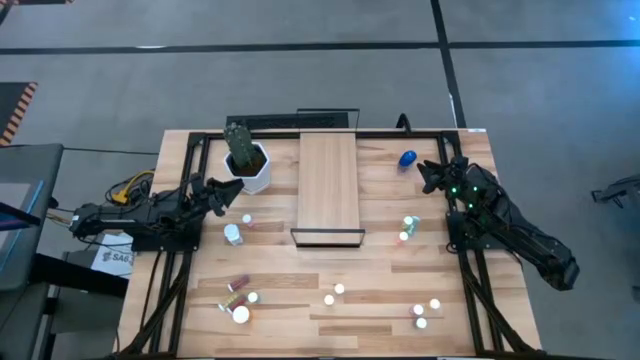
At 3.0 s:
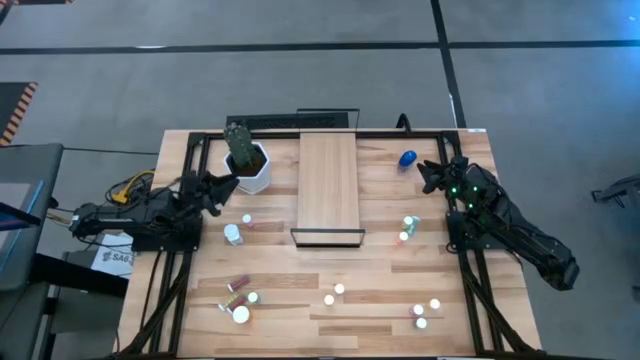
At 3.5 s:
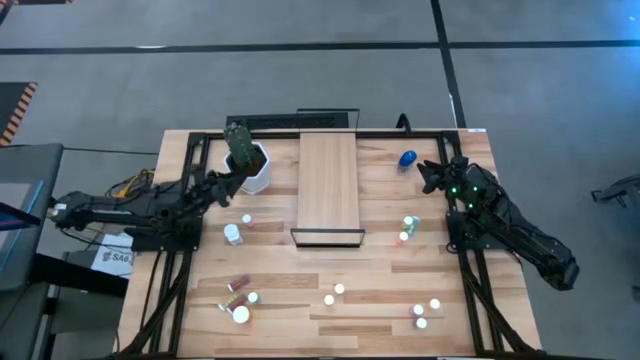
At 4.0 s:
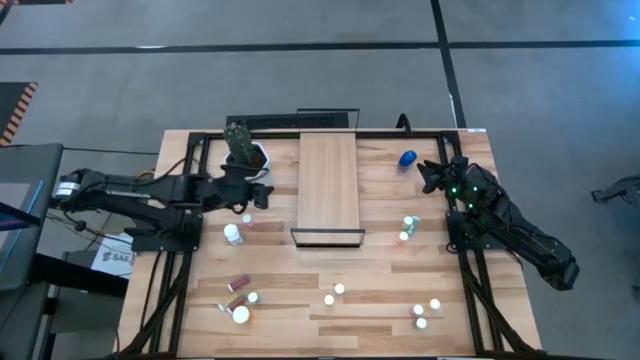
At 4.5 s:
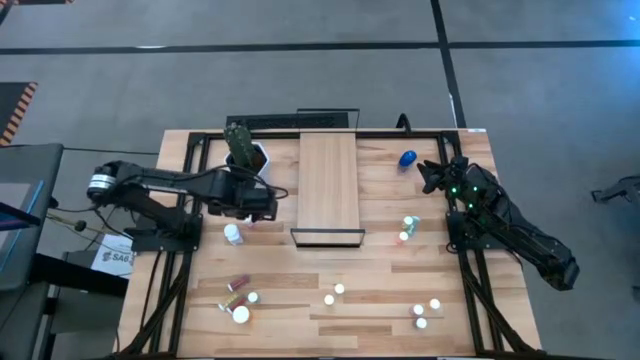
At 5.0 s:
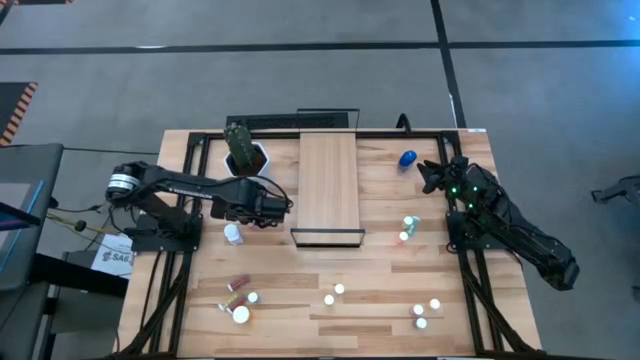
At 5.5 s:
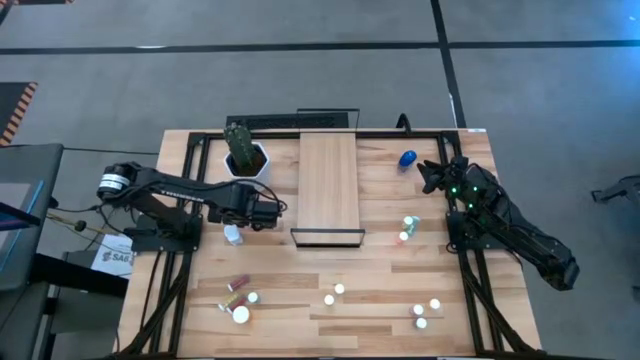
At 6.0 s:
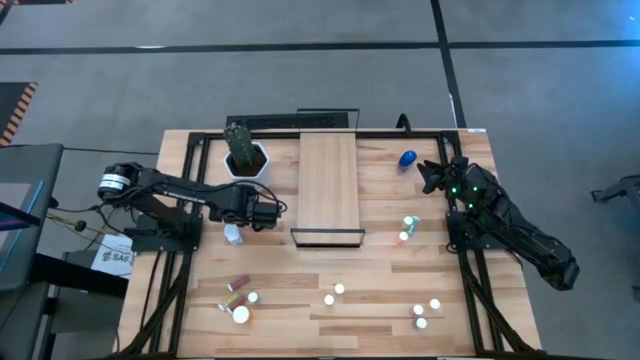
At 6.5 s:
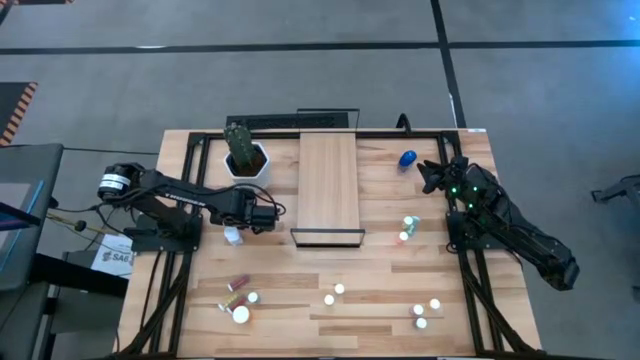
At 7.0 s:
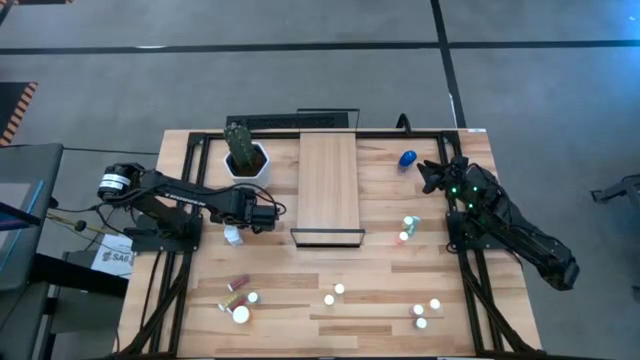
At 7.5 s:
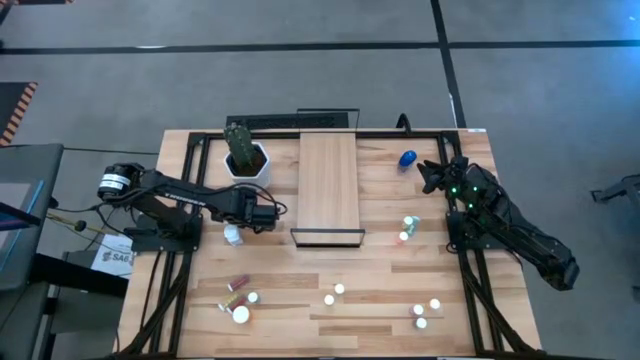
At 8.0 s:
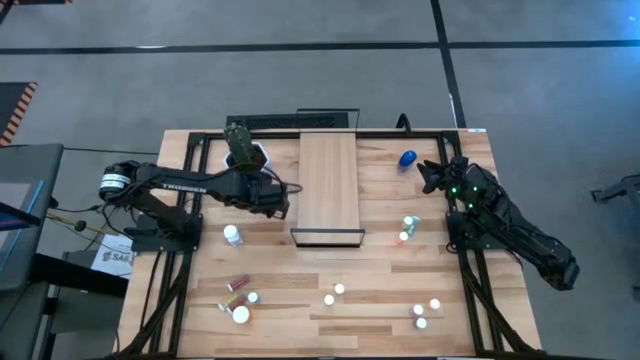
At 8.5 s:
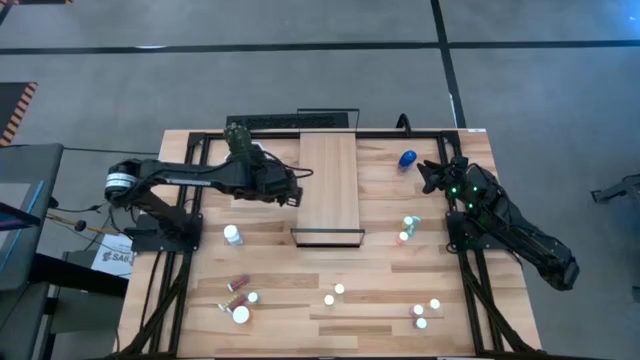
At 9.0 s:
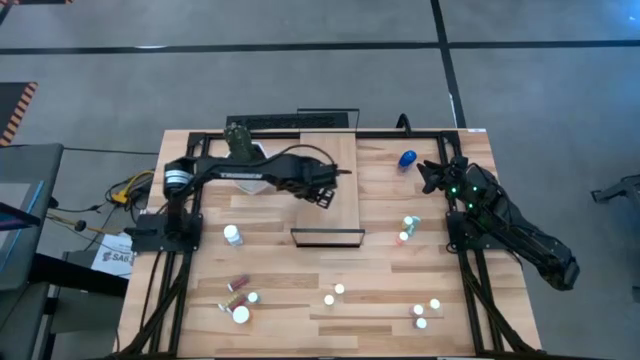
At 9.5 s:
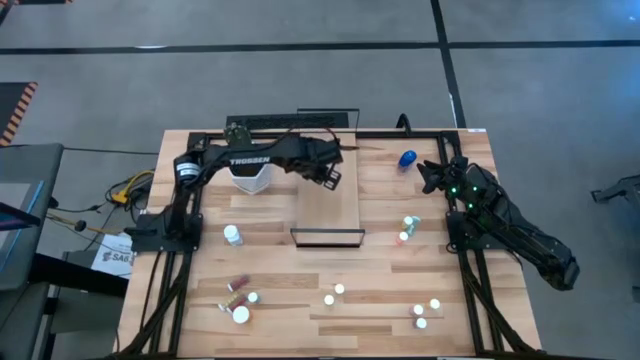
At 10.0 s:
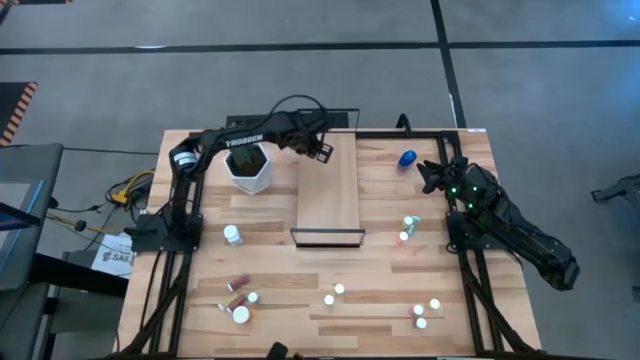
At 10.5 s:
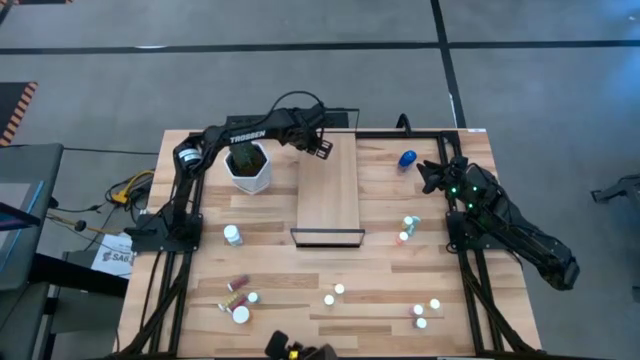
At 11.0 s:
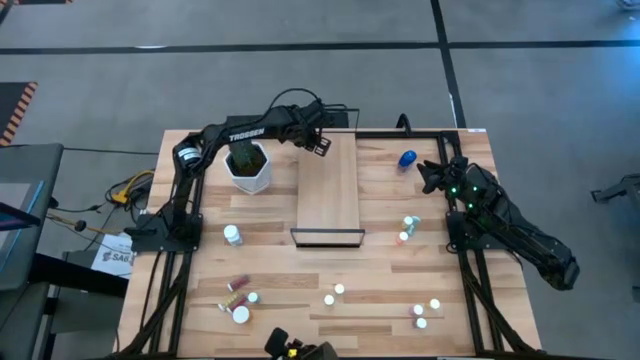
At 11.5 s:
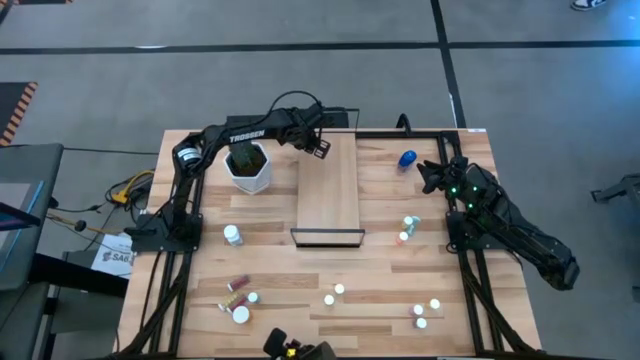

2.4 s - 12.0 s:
Task: Pick and place medicine bottles onto shelf by color
Put the pink pill bottle on the shelf

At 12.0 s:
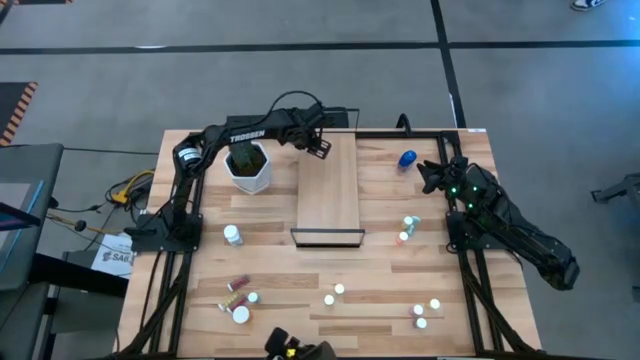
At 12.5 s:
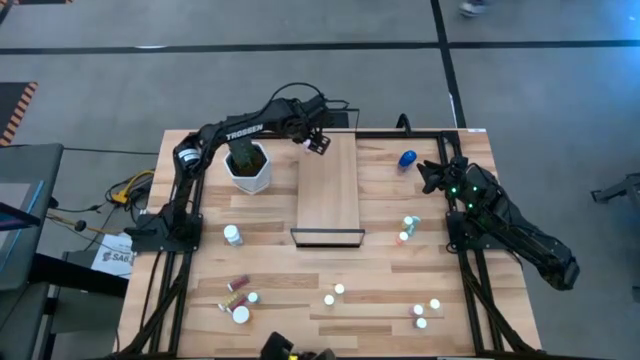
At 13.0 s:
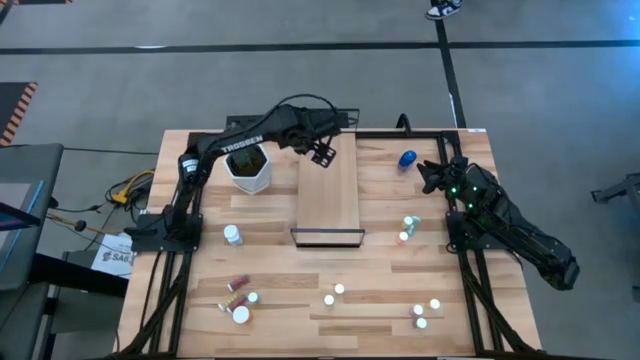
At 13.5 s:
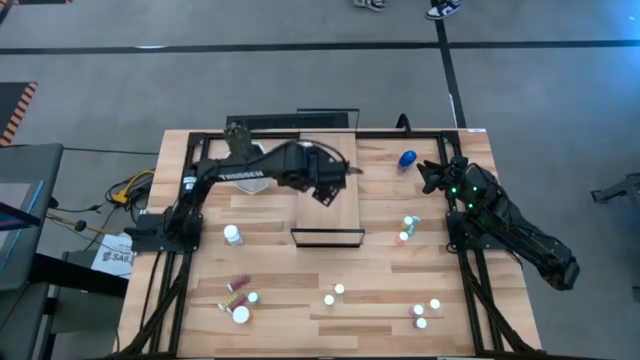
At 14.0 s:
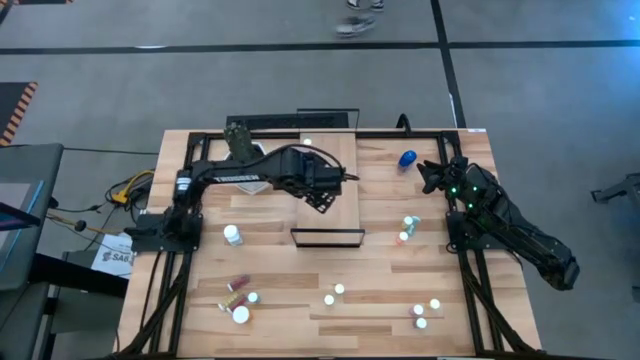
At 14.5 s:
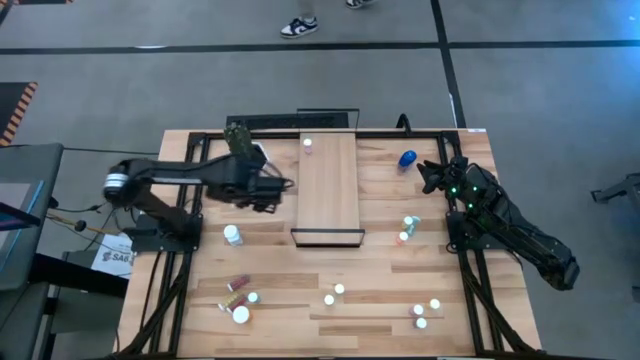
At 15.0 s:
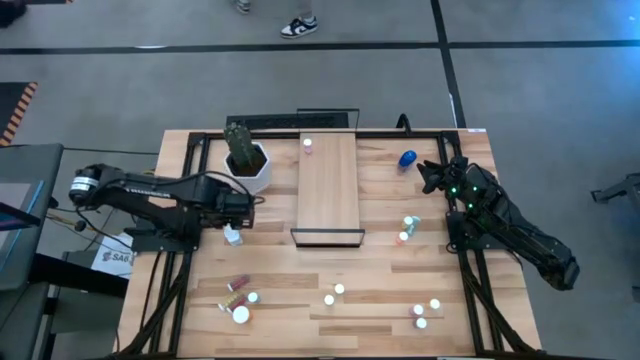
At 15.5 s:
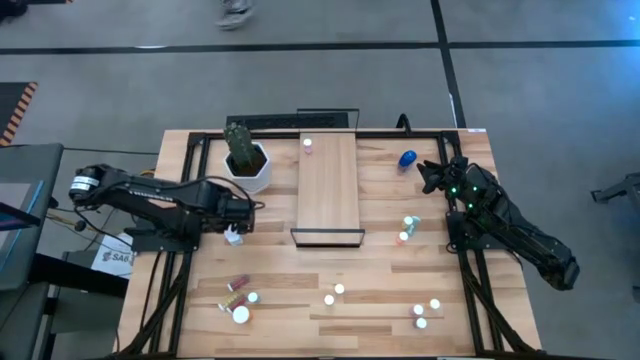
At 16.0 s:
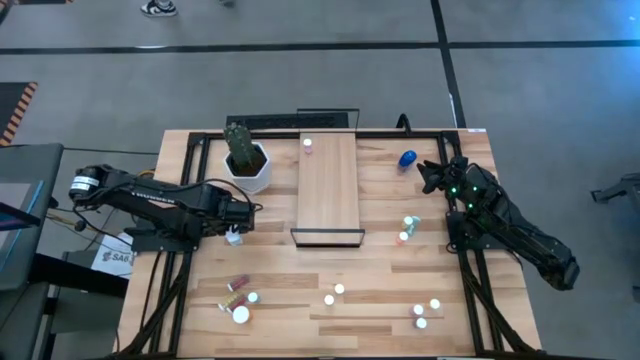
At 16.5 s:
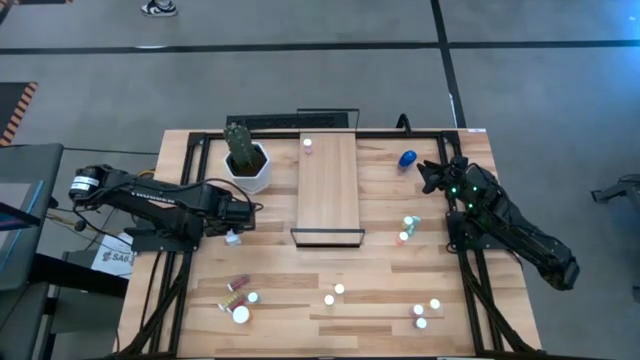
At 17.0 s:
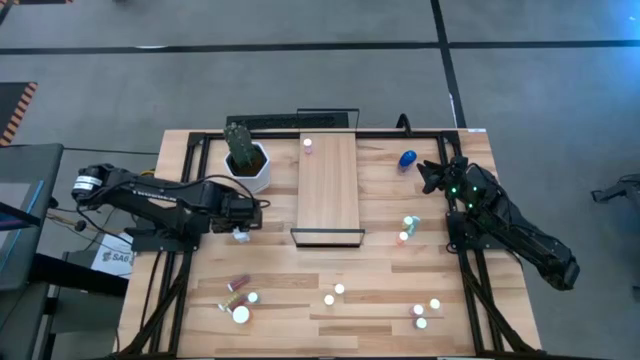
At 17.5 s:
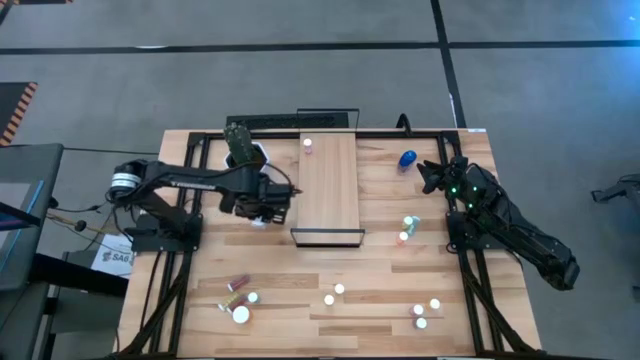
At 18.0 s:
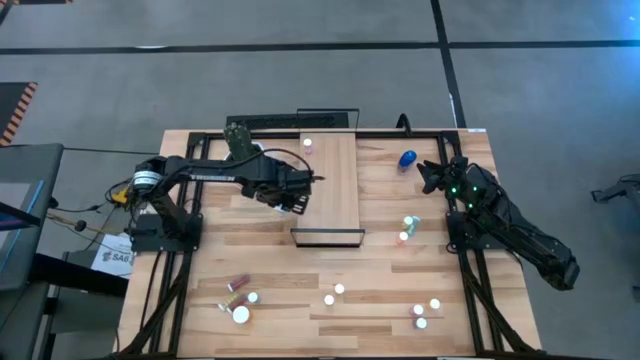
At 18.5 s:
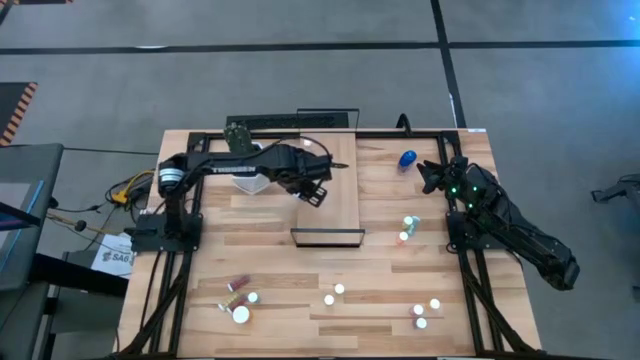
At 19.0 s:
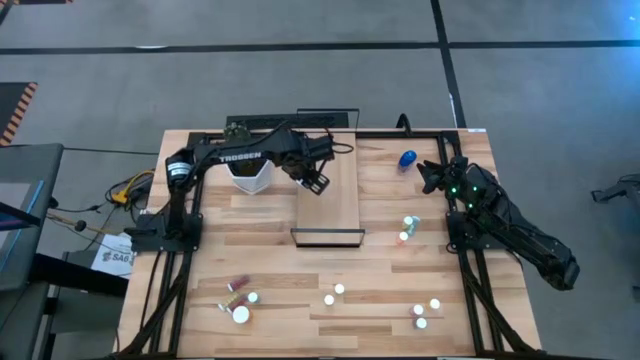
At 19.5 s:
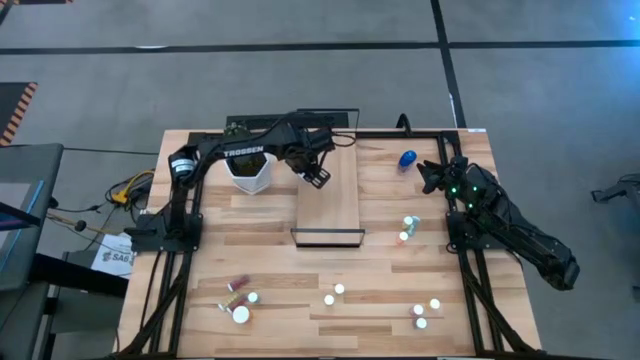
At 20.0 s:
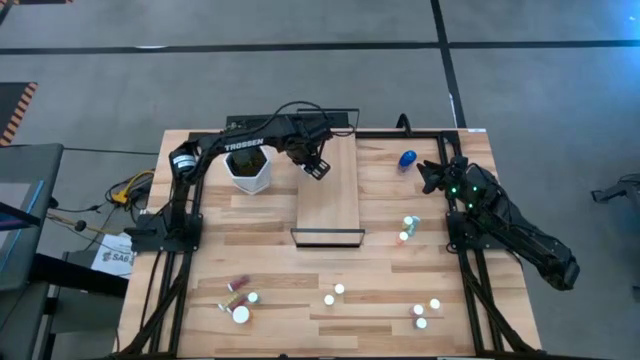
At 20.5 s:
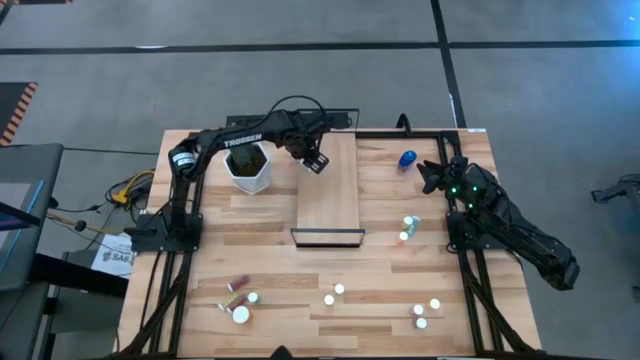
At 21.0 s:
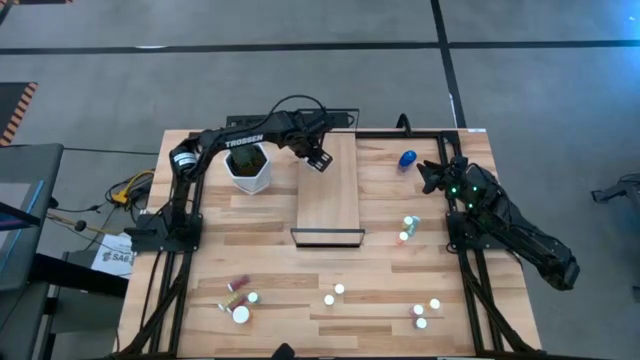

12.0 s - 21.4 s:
Put the white pill bottle on the shelf

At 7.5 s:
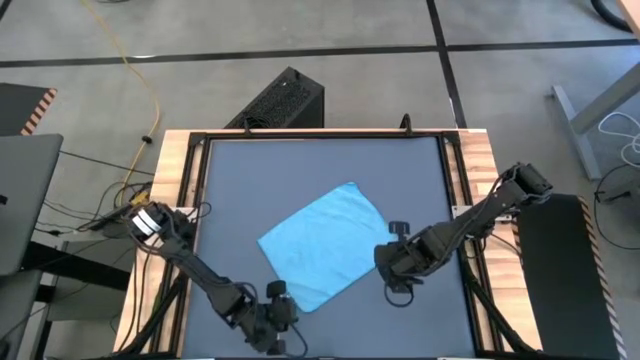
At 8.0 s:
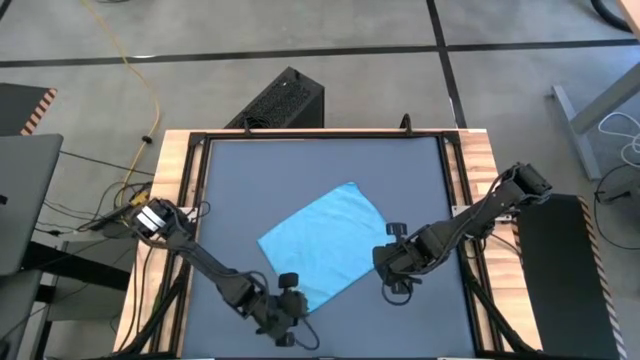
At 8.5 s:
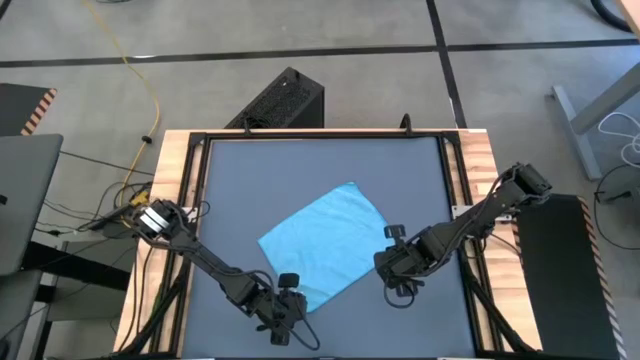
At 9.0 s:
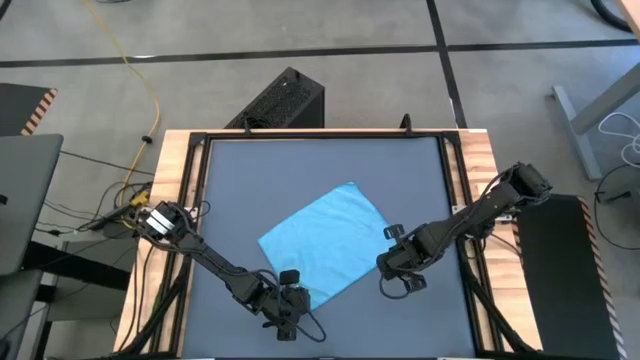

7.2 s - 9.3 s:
Task: Roll towel
Fold the blue towel
